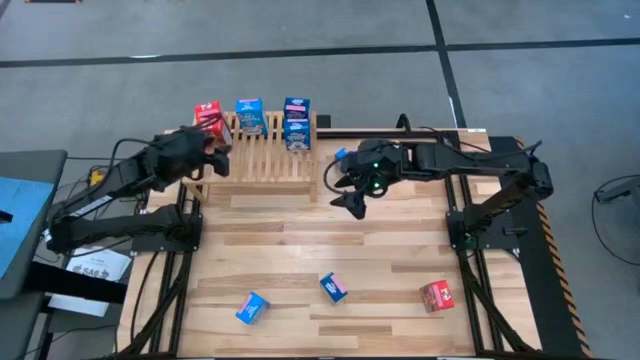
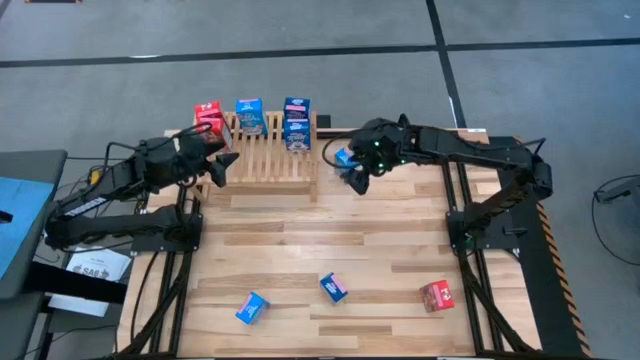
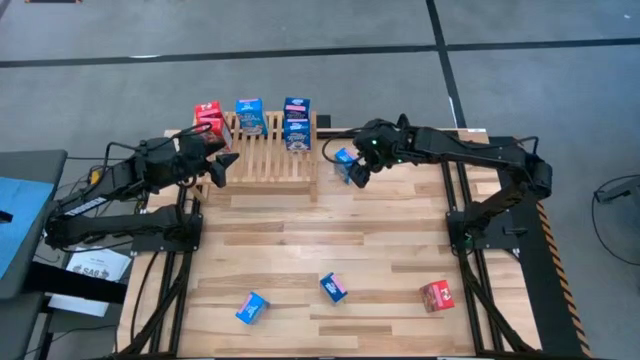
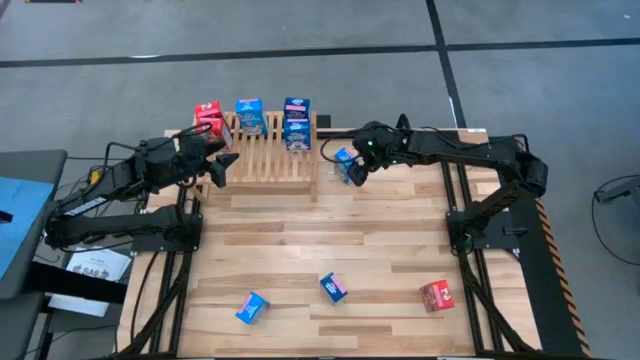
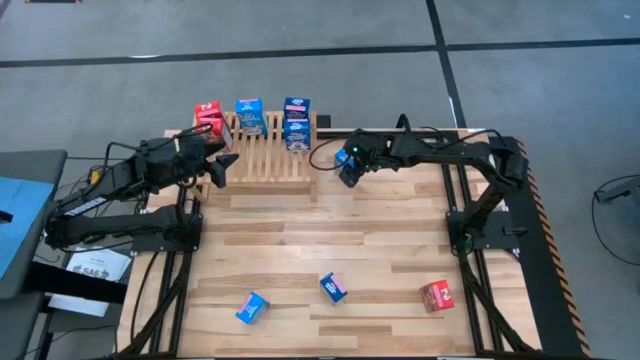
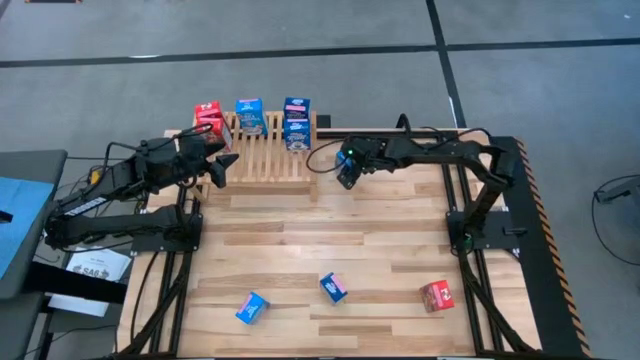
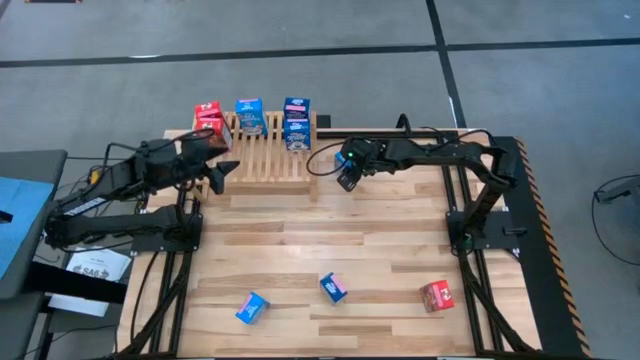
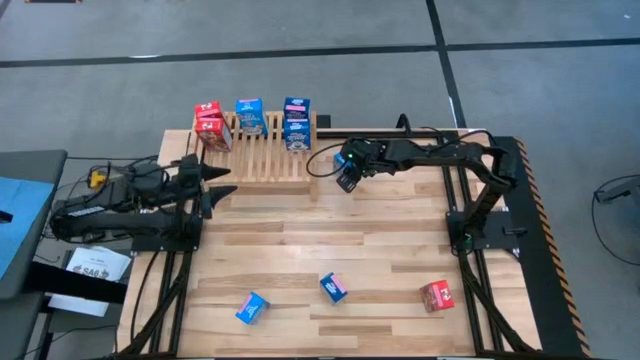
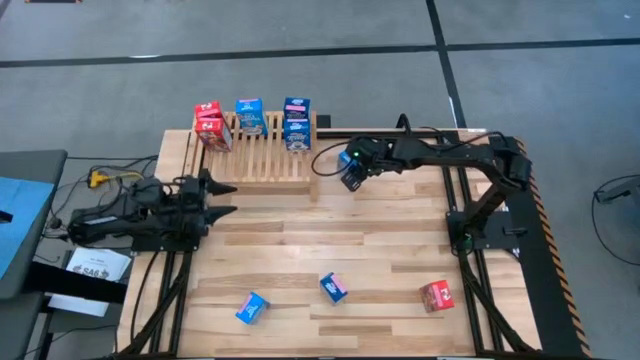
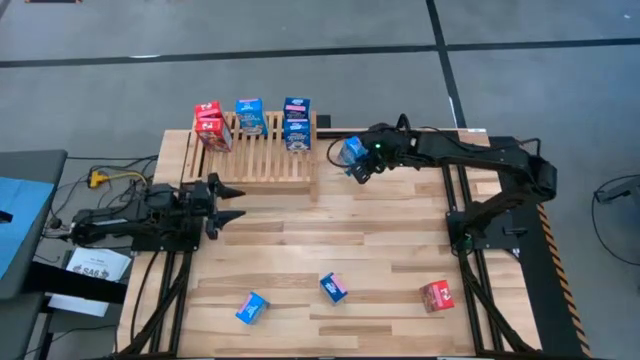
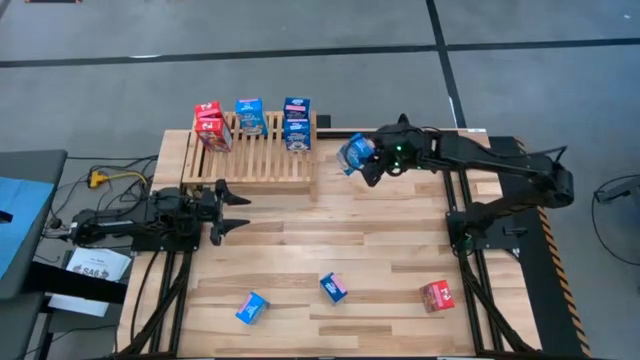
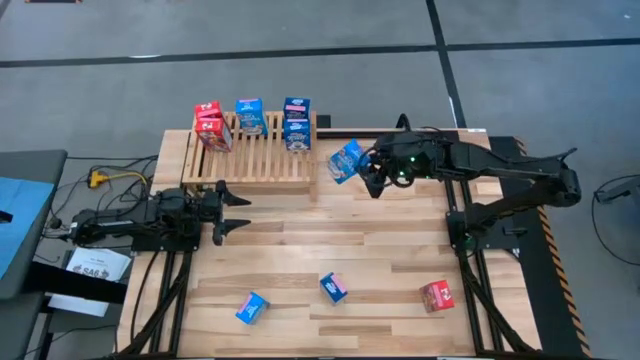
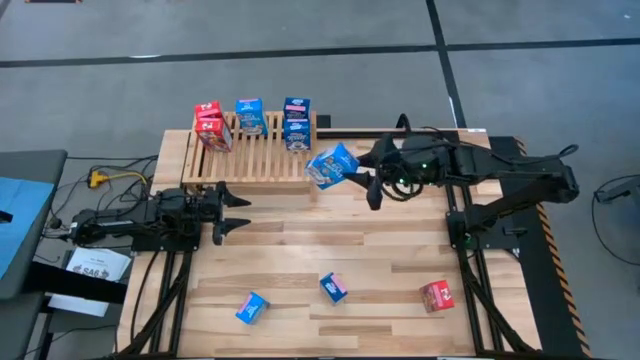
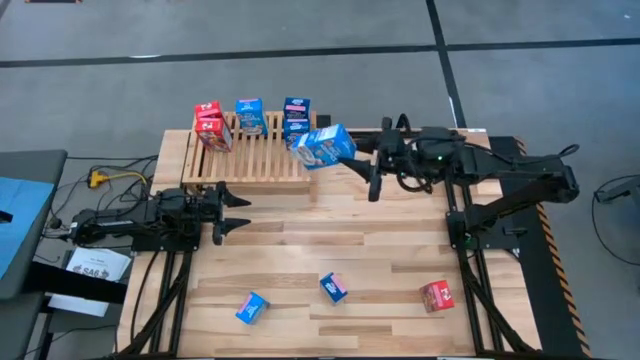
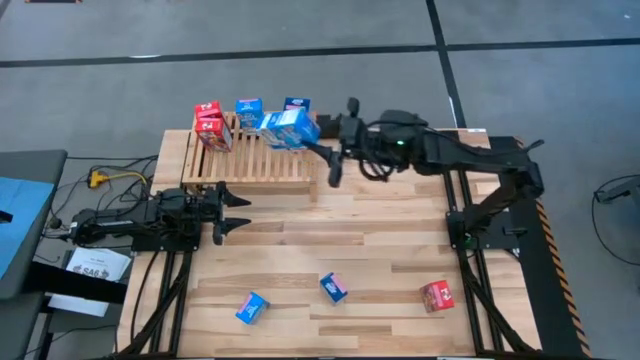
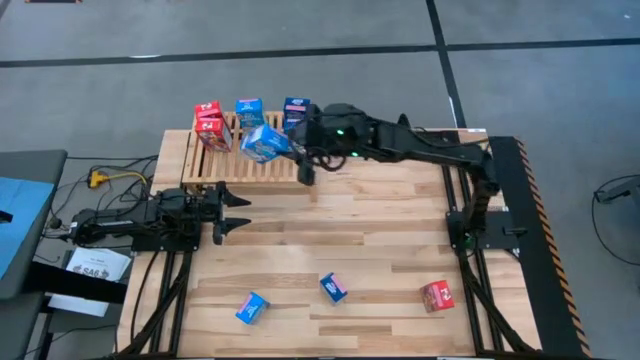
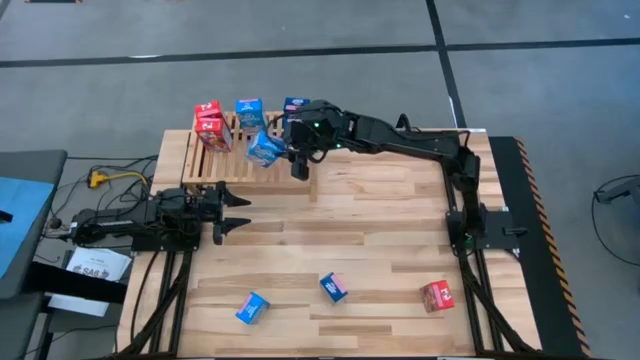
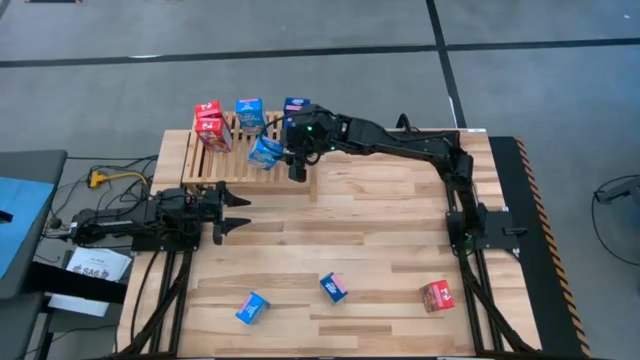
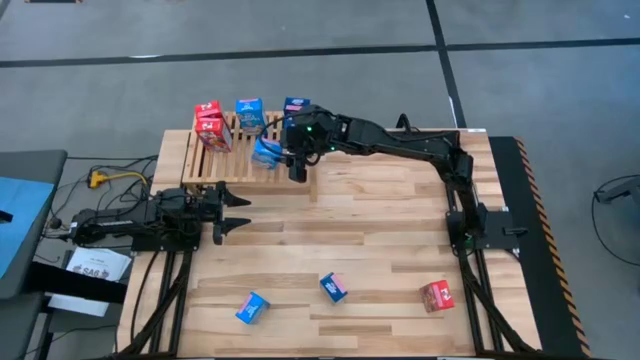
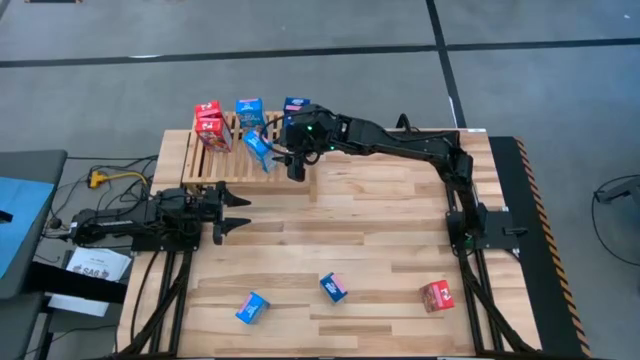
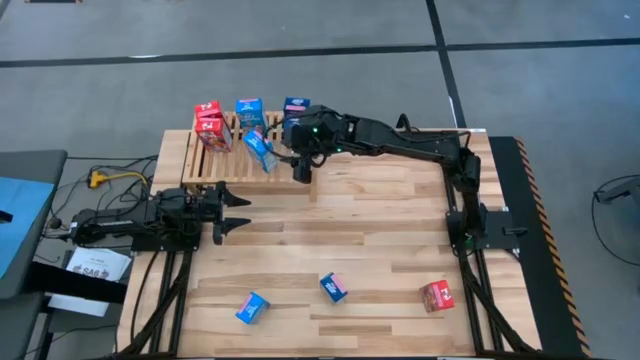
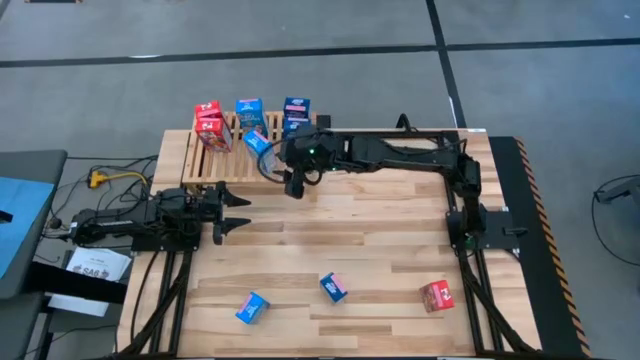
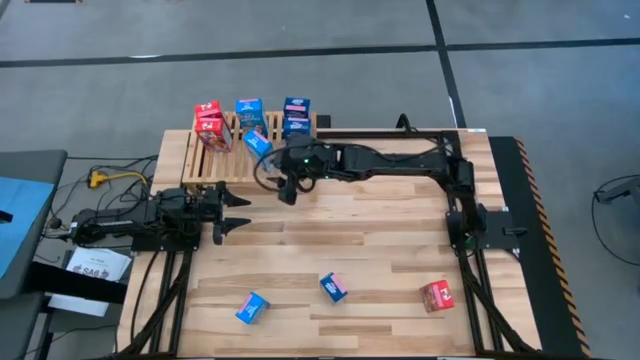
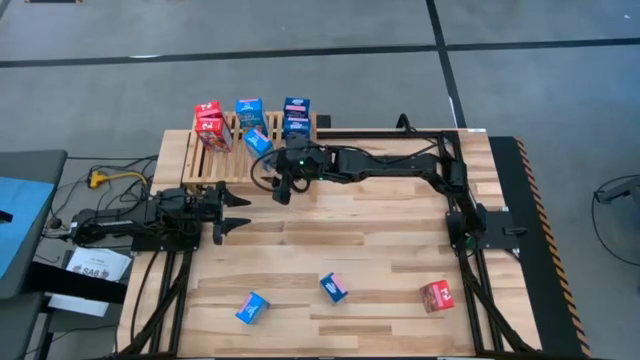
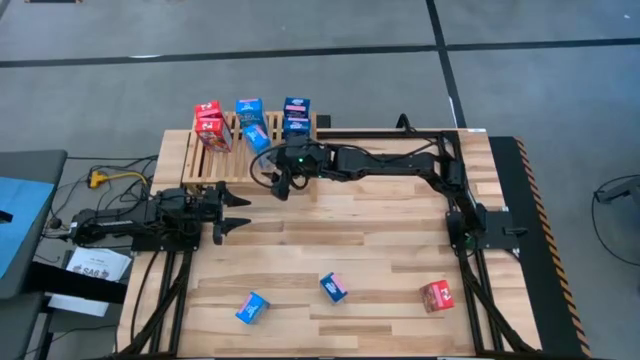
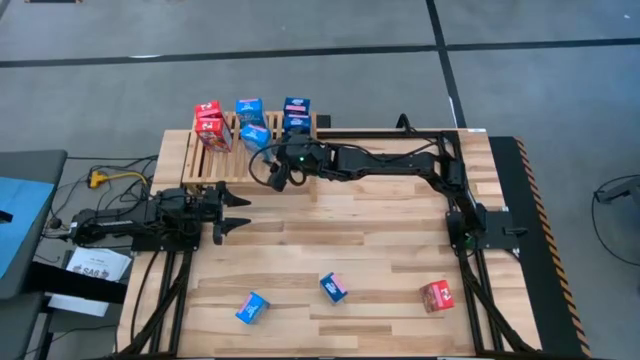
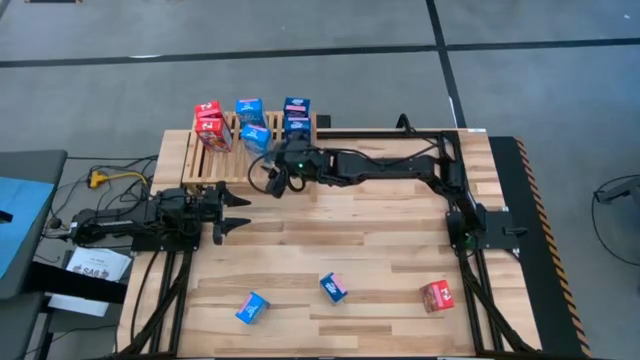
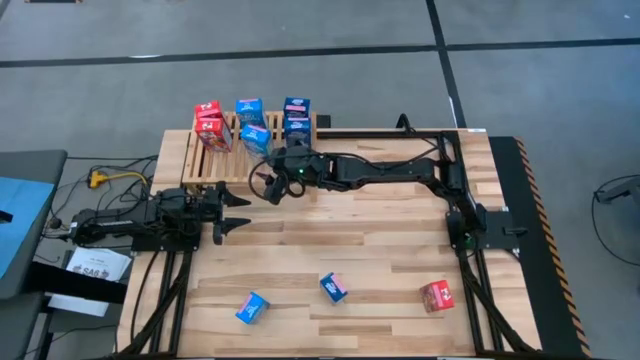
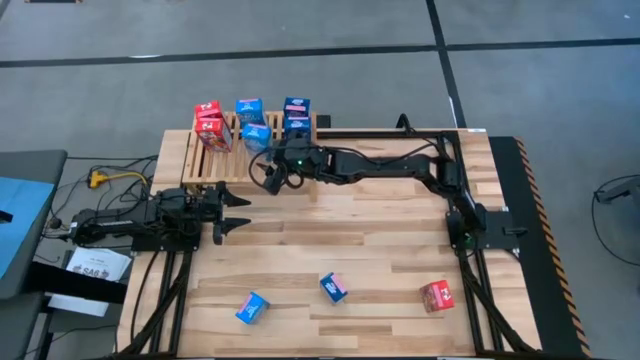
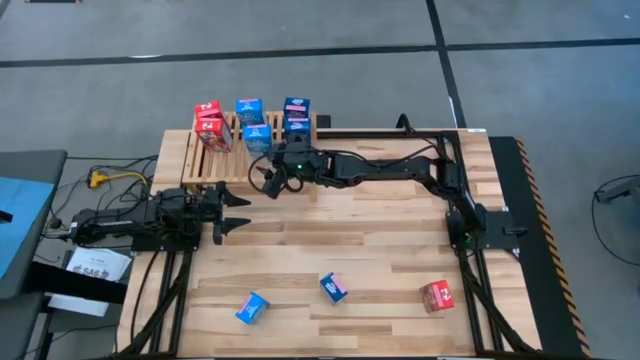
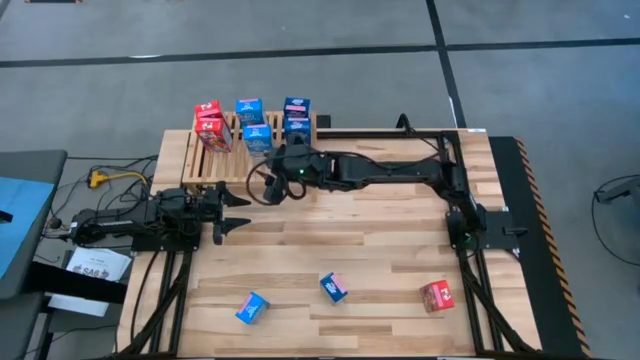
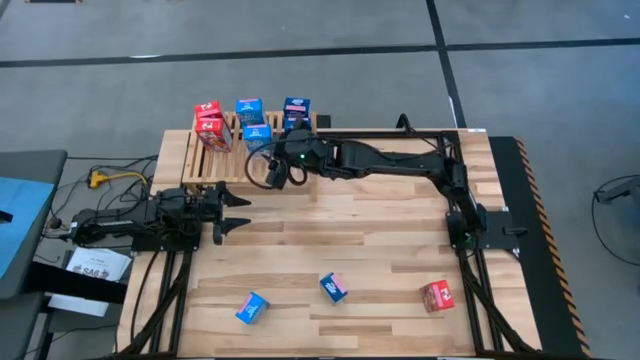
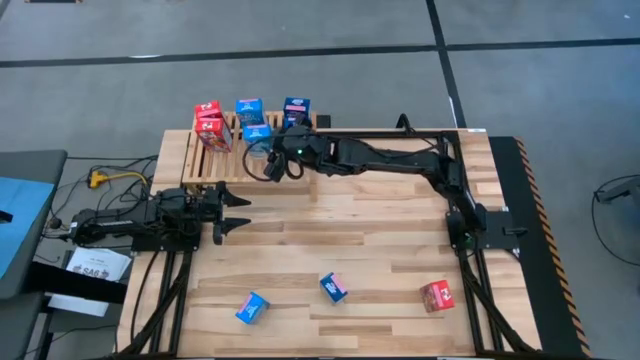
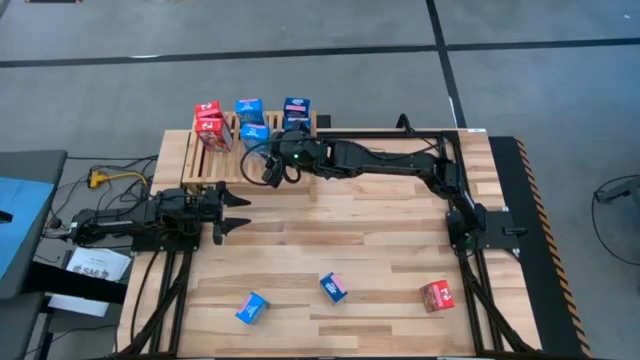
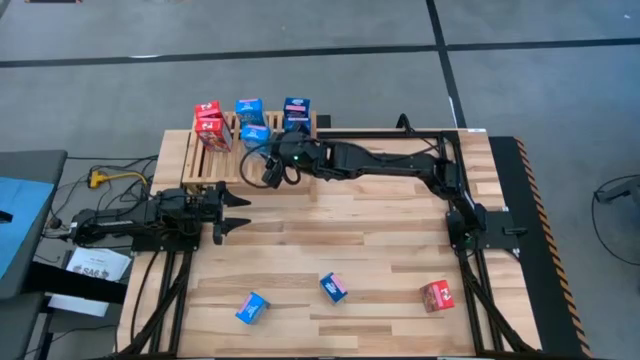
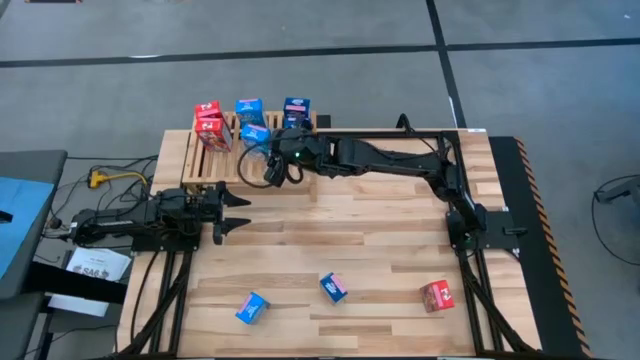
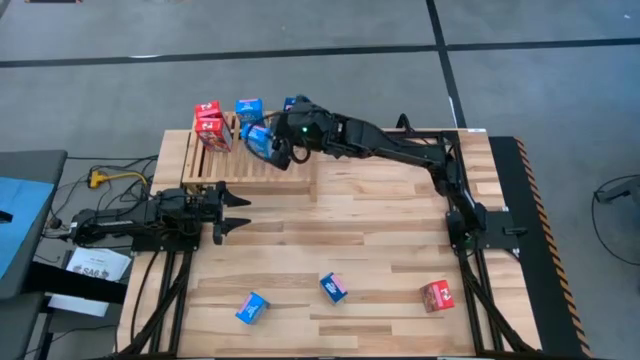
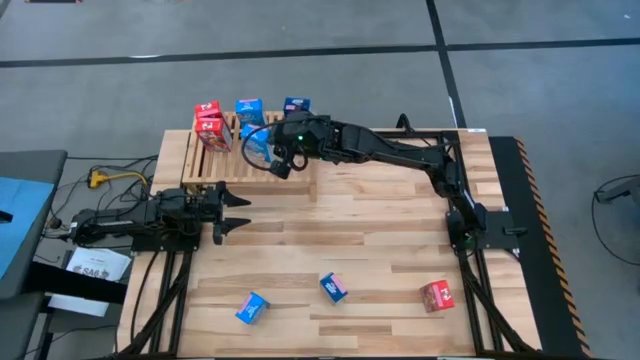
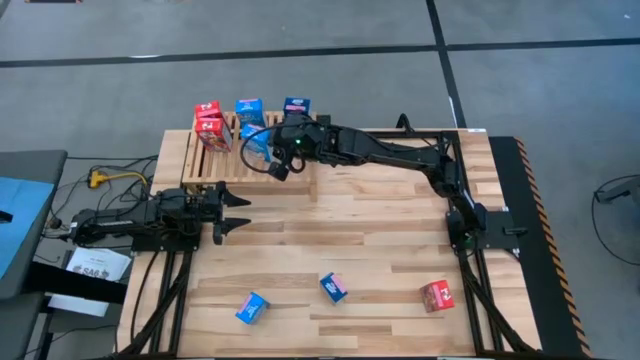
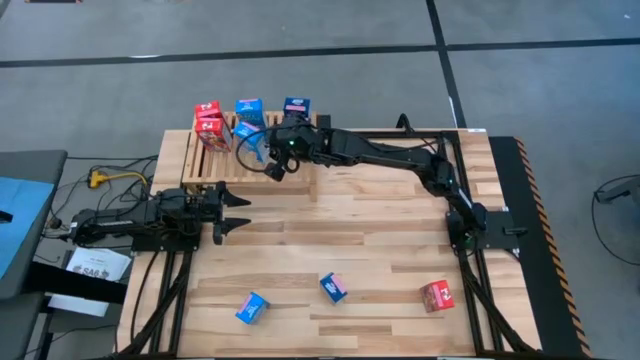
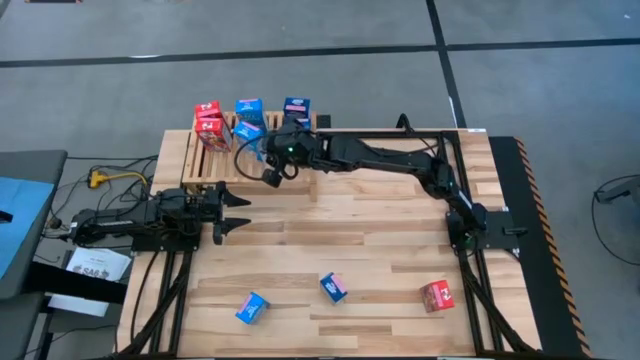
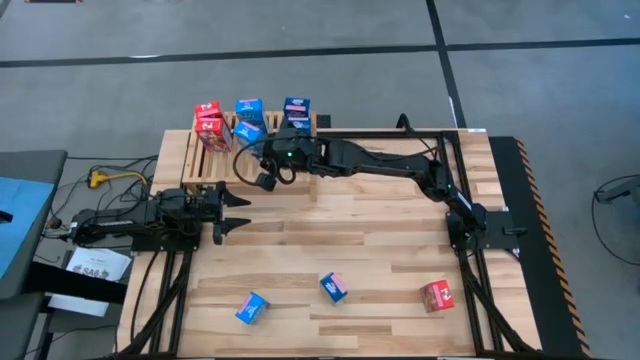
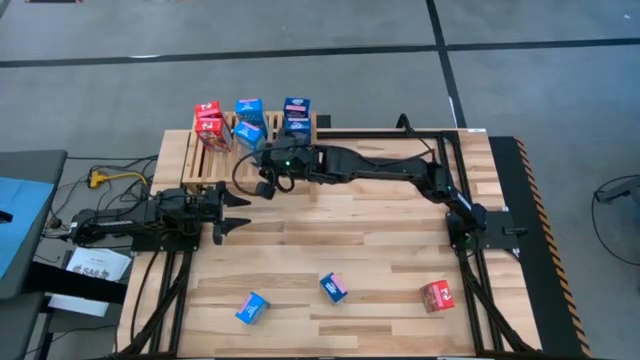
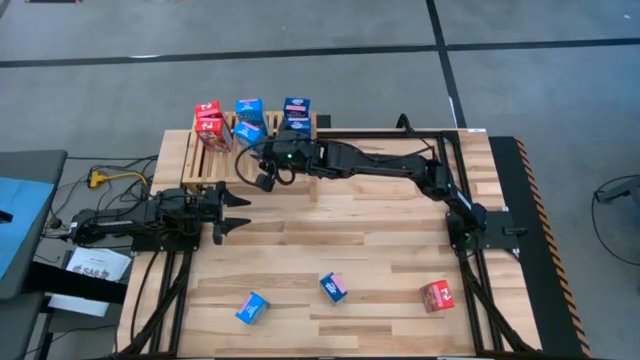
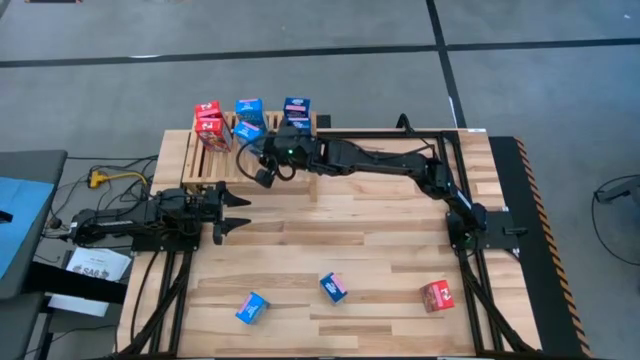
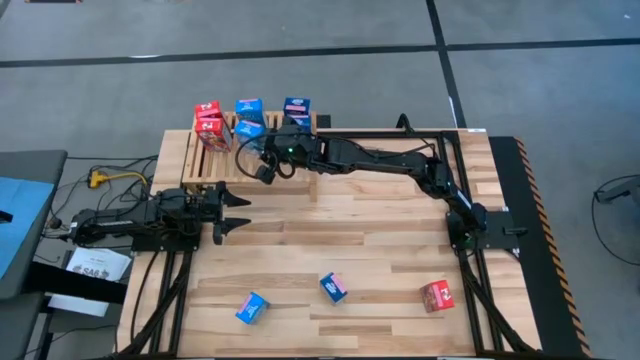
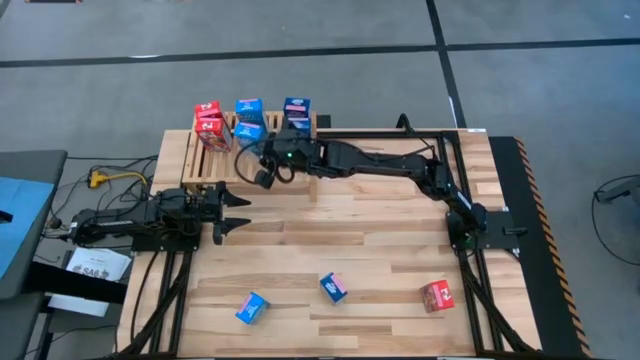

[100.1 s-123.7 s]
Task: Stack cereal on shelf
Put the top light blue cereal box the aligned with the other light blue cereal box on the shelf
